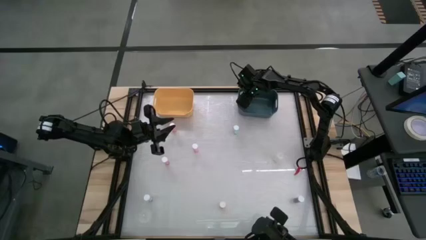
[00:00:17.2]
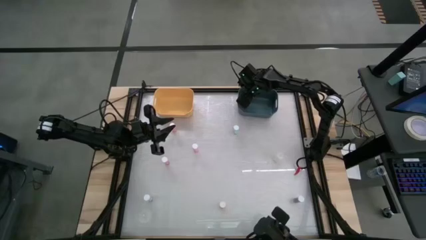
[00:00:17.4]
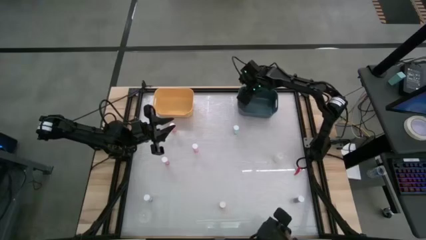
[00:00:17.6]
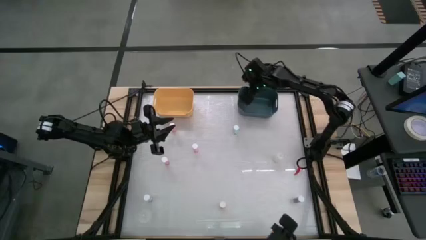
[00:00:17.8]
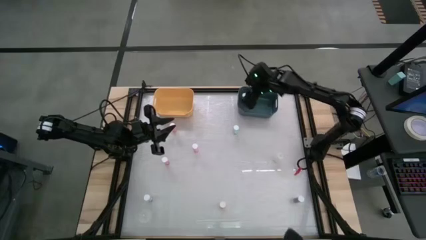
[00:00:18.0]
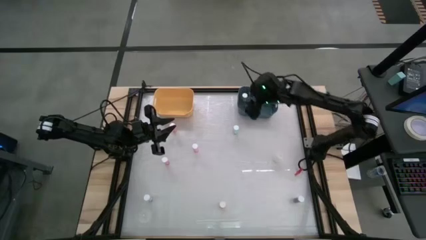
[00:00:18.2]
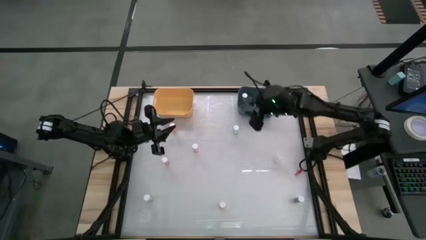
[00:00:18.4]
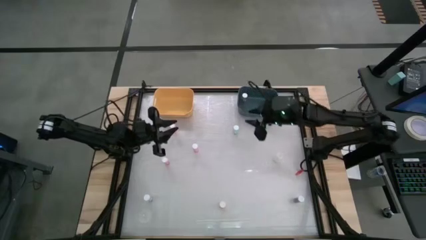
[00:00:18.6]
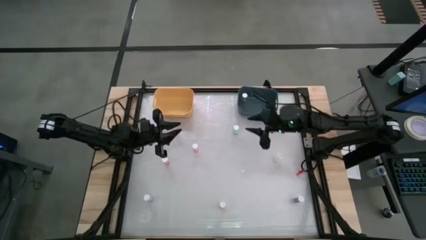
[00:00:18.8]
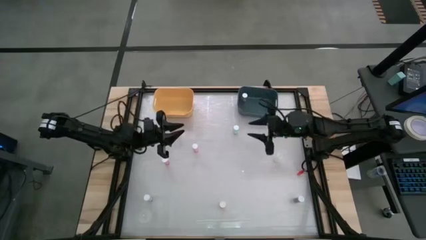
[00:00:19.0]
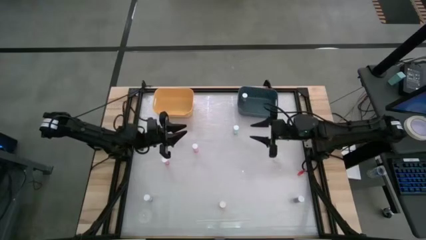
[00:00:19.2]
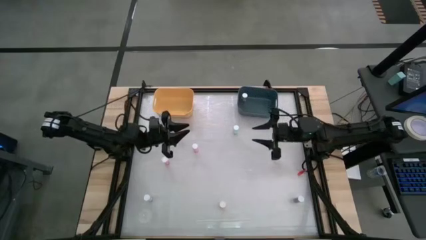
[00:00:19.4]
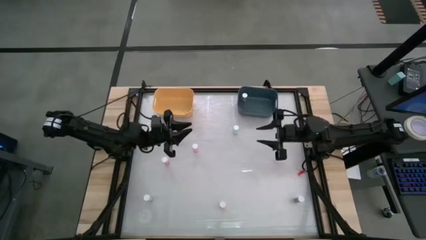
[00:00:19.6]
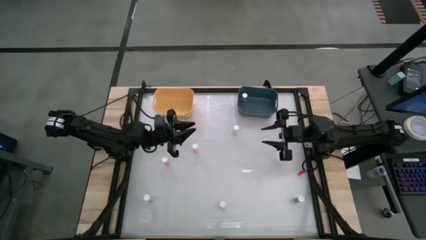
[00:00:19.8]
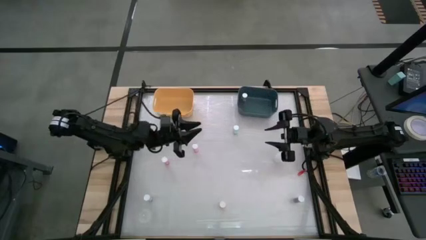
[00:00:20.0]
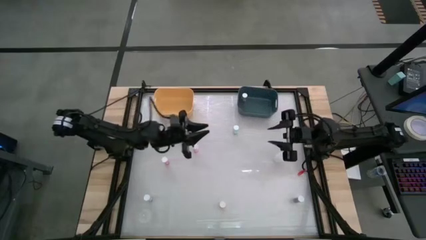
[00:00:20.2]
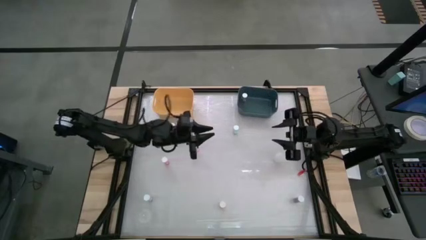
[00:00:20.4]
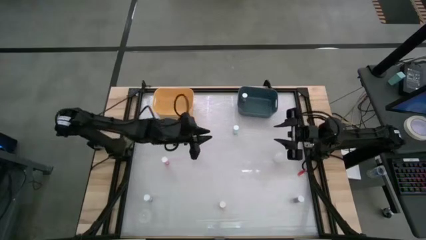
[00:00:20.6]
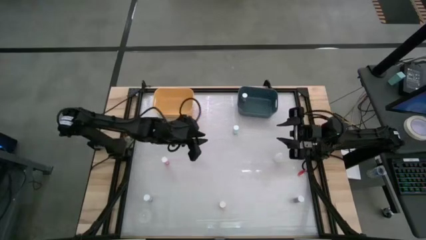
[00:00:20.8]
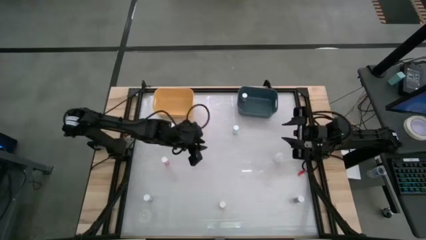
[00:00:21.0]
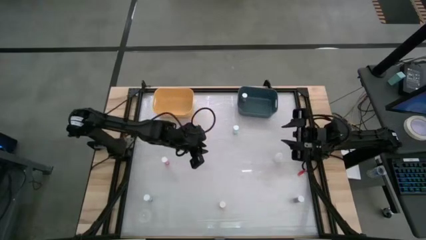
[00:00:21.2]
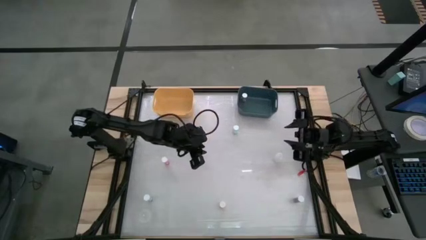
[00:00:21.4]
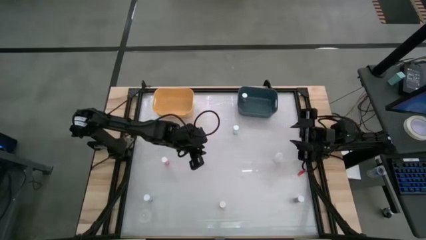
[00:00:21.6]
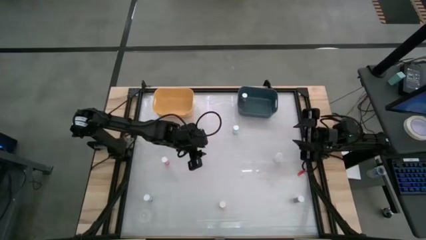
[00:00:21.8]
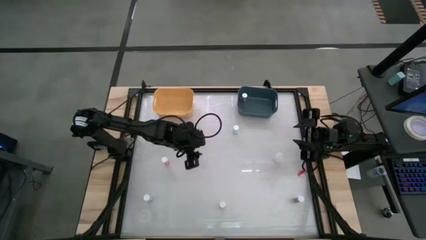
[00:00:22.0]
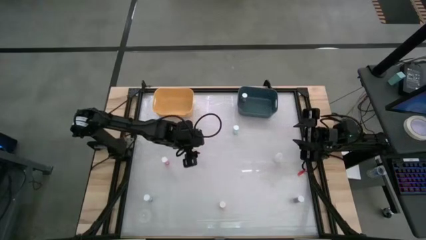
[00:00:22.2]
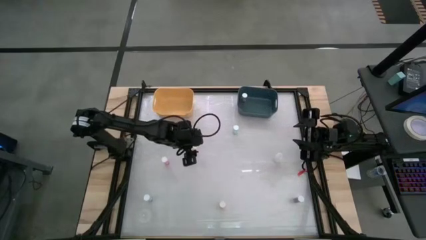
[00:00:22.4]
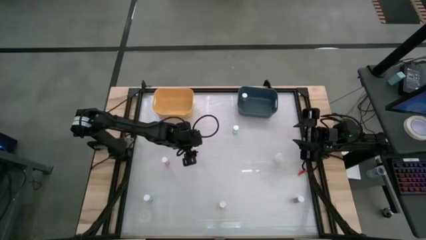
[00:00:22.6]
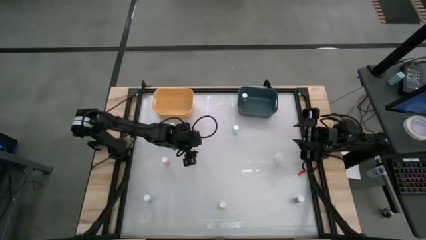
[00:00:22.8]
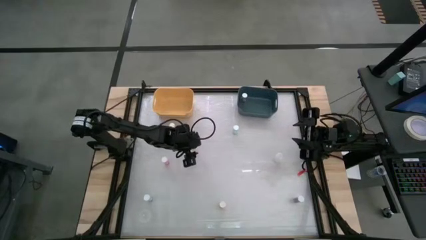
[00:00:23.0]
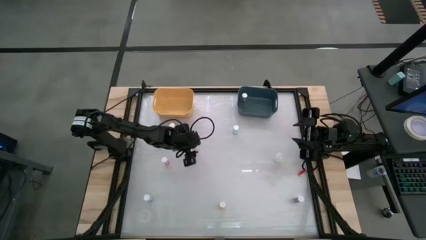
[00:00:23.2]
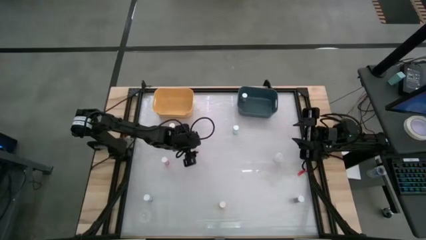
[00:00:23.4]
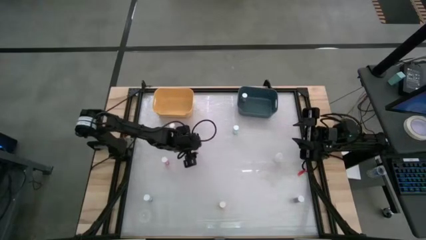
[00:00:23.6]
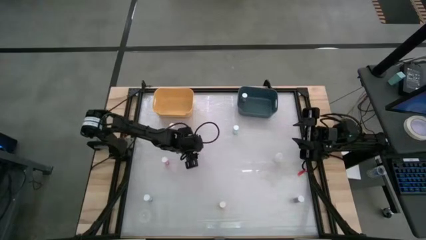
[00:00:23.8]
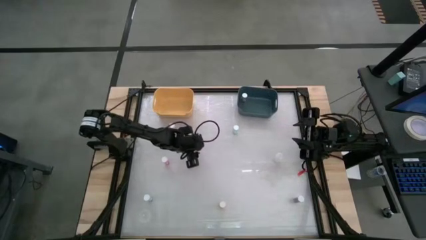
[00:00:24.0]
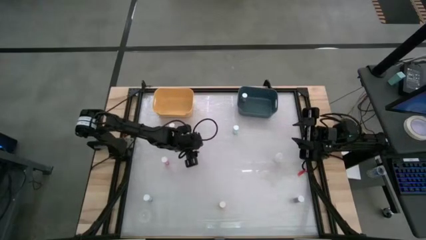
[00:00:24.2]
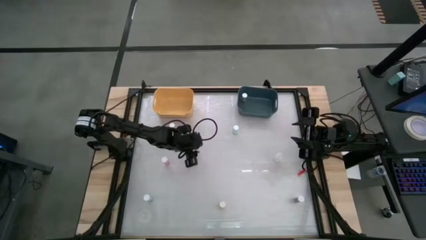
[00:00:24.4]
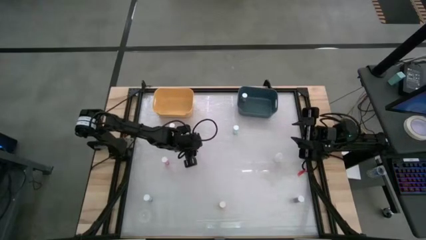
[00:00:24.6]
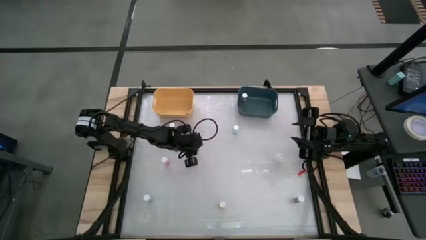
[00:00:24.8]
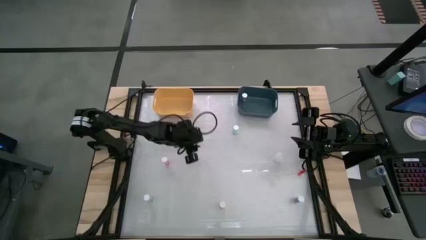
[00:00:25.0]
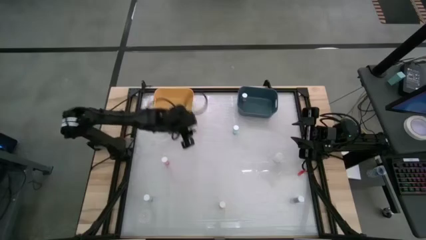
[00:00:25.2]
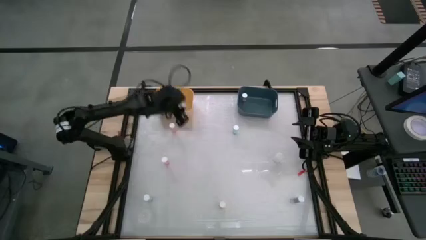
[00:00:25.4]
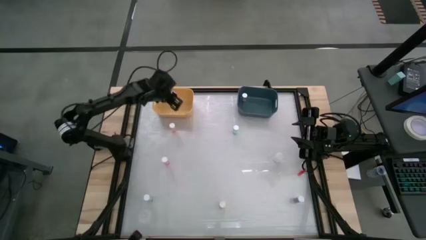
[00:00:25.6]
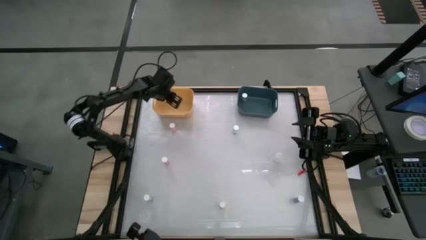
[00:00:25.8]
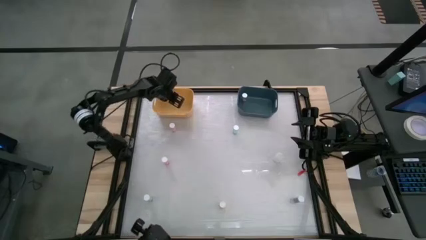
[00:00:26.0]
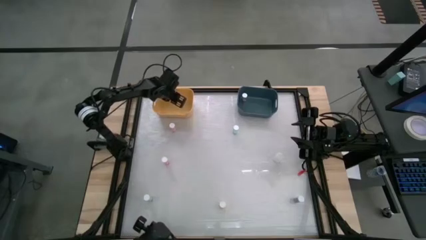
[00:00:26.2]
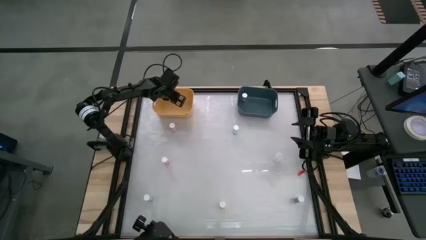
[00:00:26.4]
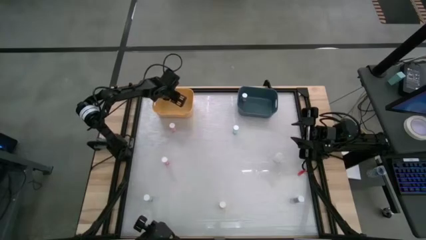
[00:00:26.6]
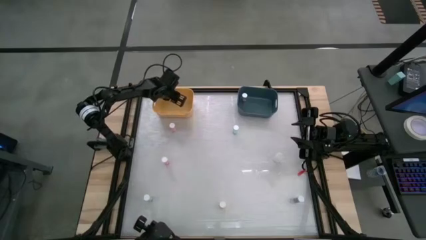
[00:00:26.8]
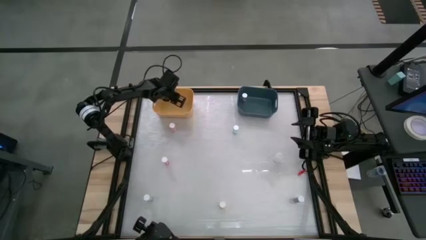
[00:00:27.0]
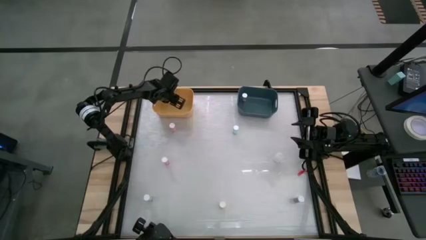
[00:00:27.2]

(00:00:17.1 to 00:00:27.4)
Task: Pick and place medicine bottles into bin by pill shape (circle, oval)
Put the middle pink tablet bottle into the yellow bin
